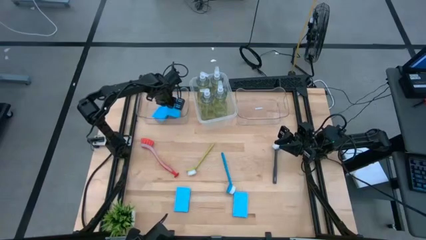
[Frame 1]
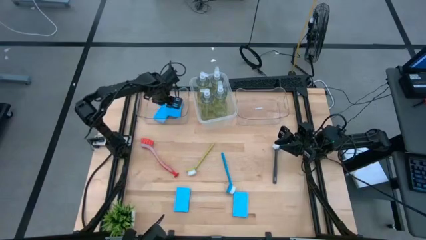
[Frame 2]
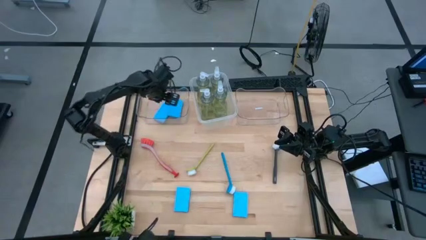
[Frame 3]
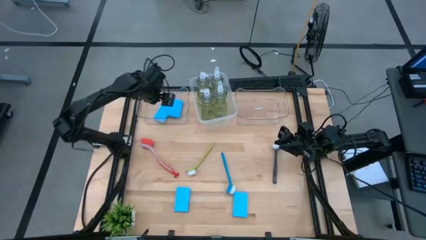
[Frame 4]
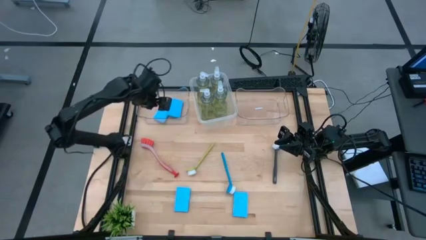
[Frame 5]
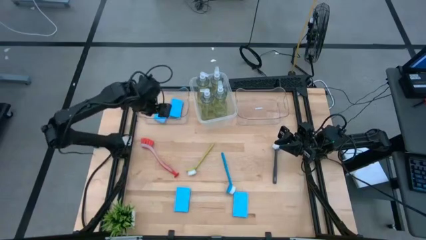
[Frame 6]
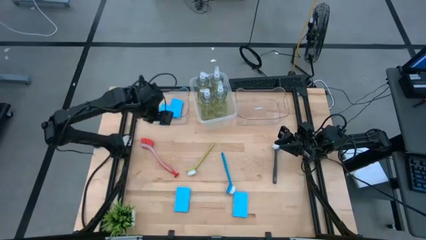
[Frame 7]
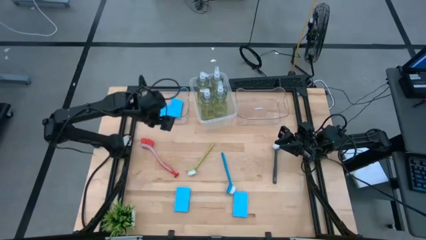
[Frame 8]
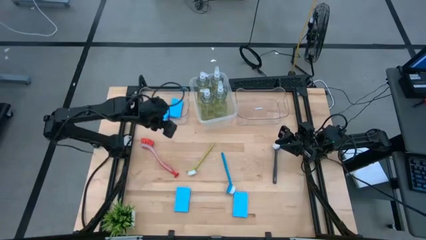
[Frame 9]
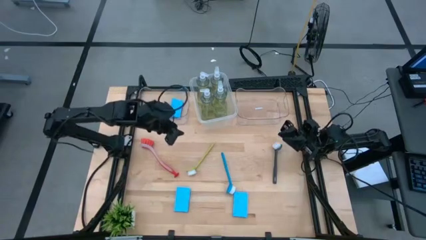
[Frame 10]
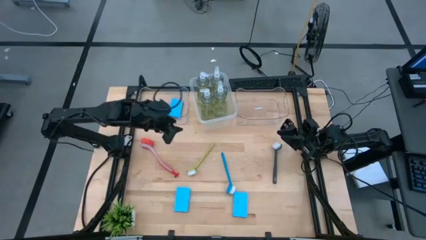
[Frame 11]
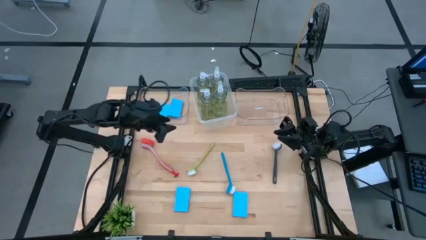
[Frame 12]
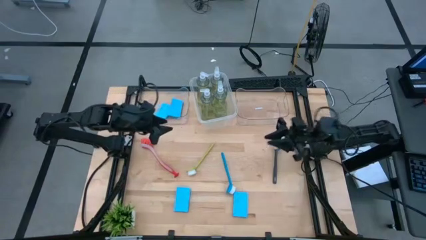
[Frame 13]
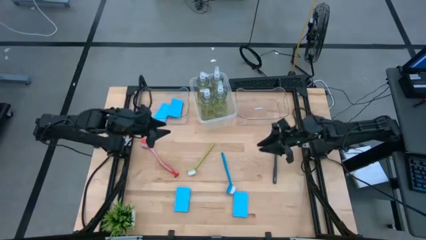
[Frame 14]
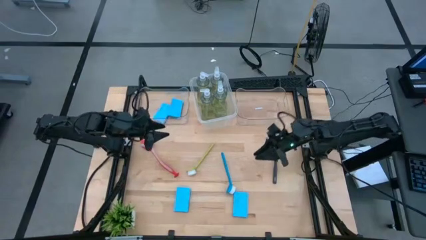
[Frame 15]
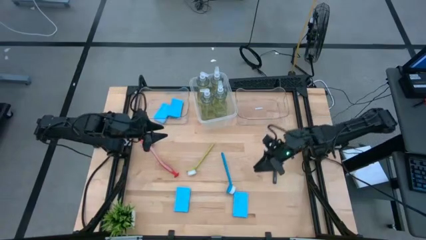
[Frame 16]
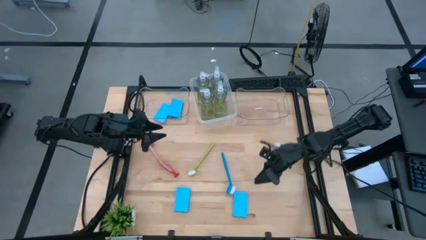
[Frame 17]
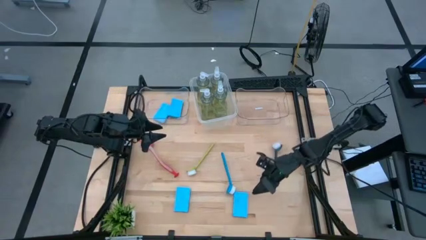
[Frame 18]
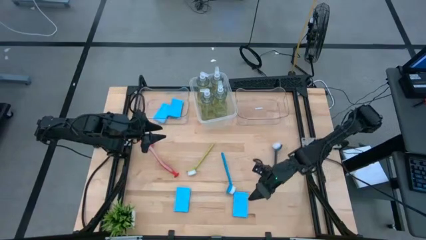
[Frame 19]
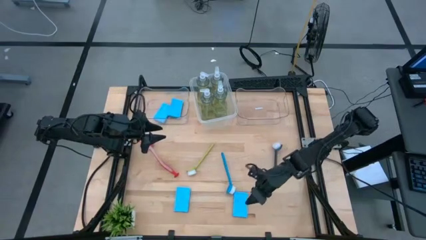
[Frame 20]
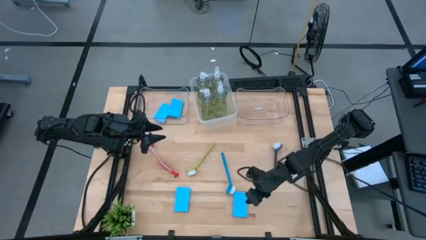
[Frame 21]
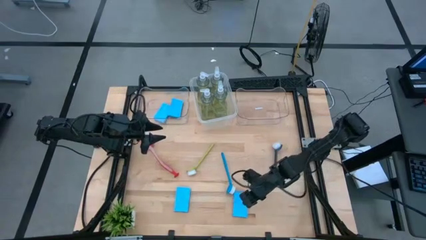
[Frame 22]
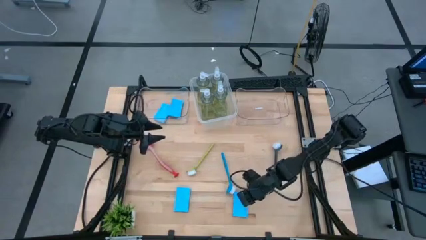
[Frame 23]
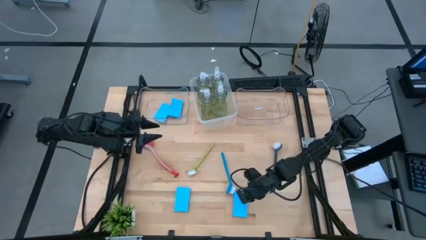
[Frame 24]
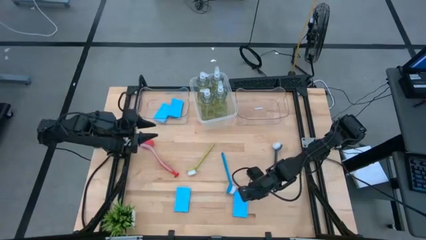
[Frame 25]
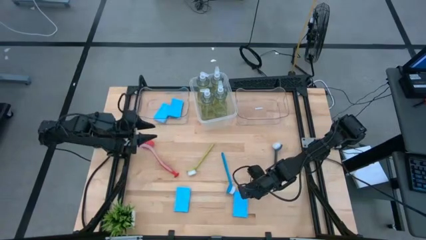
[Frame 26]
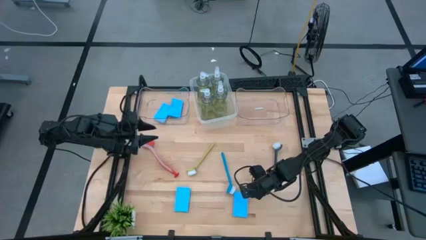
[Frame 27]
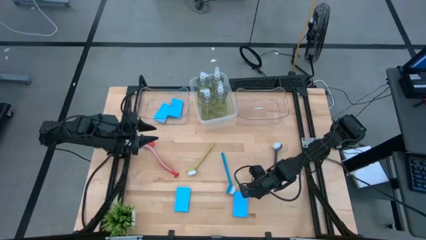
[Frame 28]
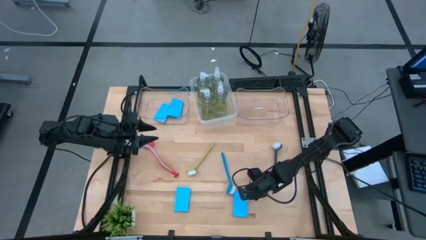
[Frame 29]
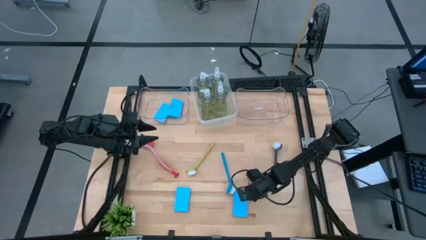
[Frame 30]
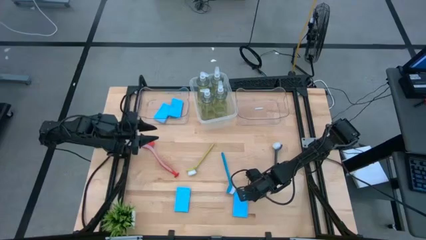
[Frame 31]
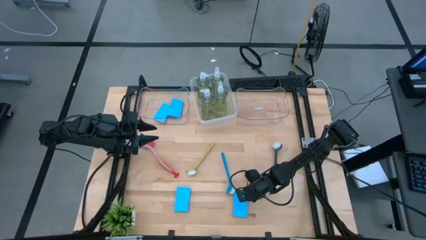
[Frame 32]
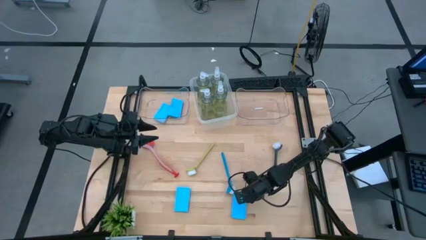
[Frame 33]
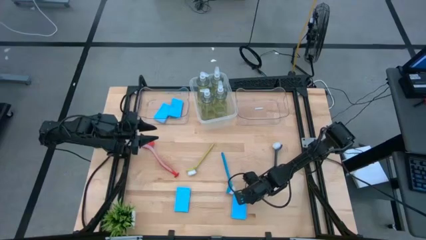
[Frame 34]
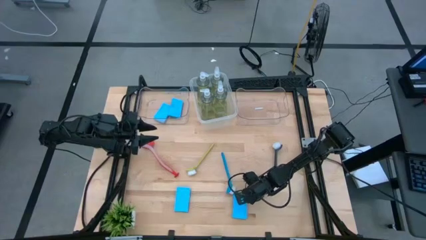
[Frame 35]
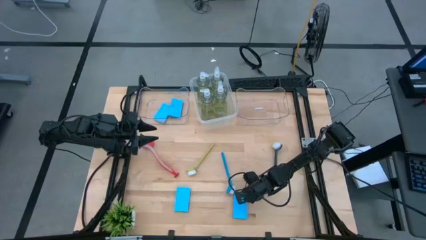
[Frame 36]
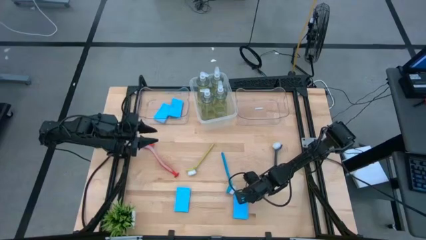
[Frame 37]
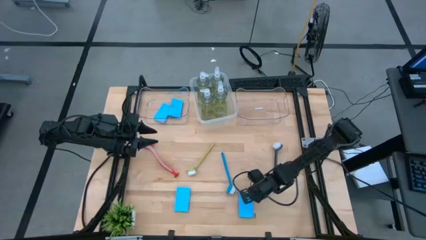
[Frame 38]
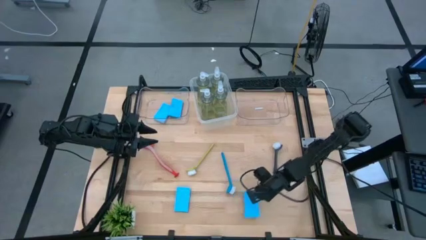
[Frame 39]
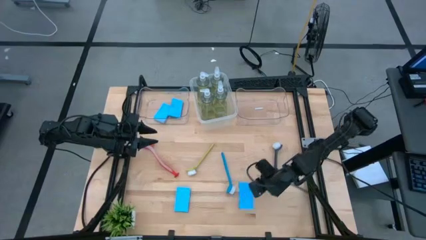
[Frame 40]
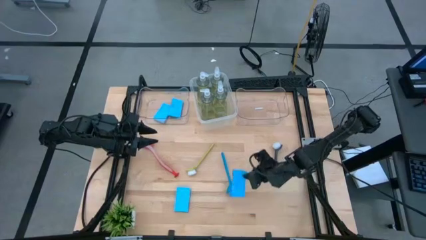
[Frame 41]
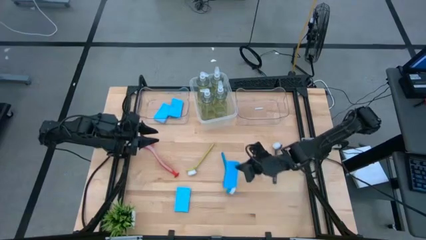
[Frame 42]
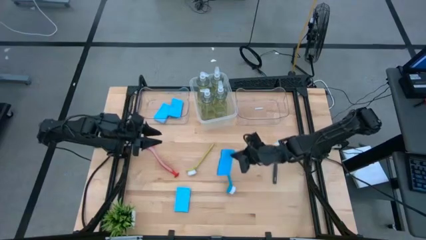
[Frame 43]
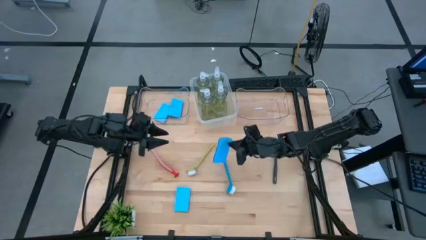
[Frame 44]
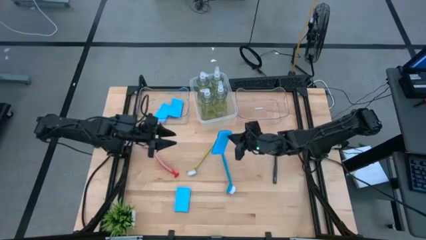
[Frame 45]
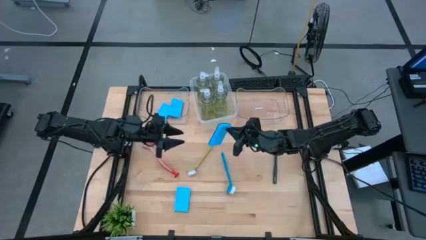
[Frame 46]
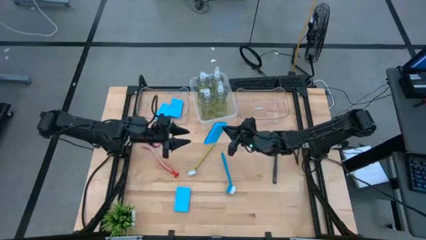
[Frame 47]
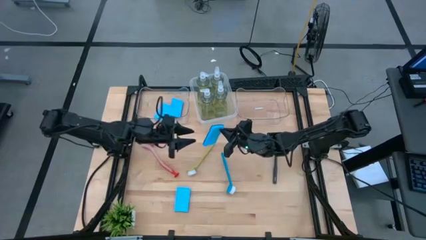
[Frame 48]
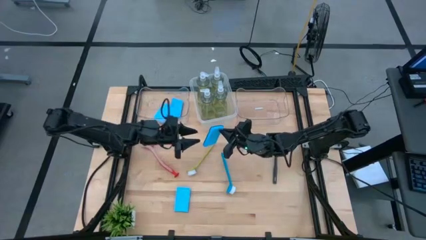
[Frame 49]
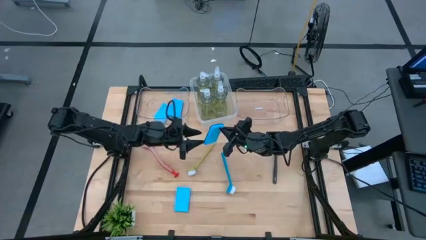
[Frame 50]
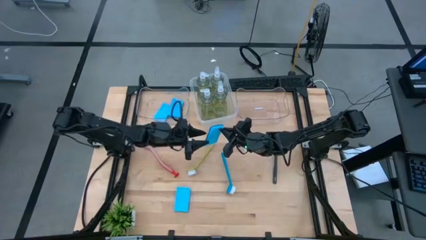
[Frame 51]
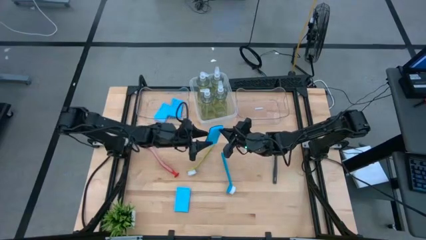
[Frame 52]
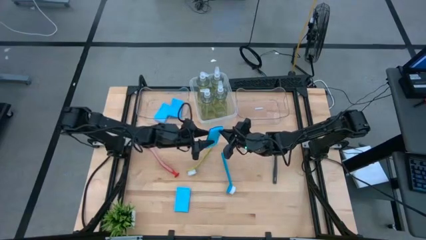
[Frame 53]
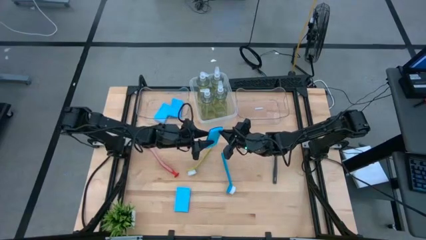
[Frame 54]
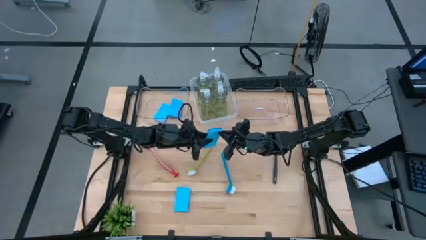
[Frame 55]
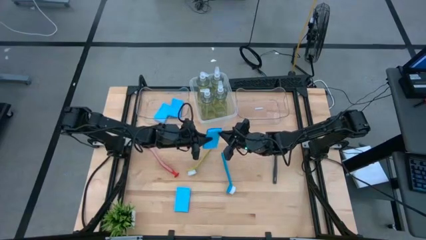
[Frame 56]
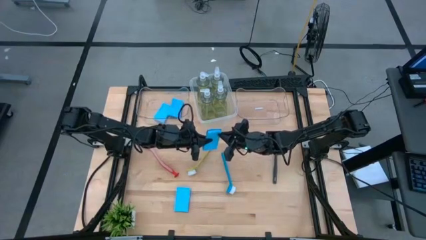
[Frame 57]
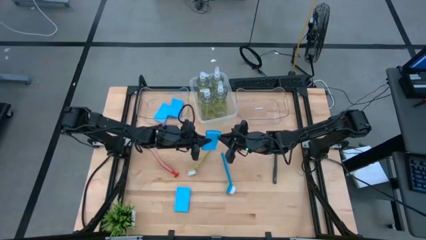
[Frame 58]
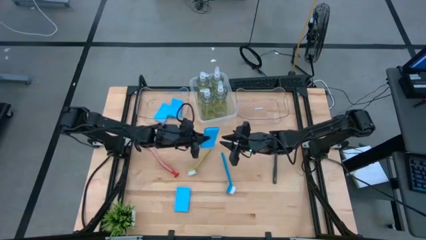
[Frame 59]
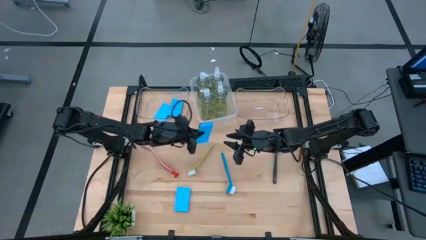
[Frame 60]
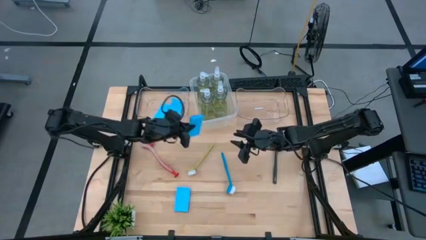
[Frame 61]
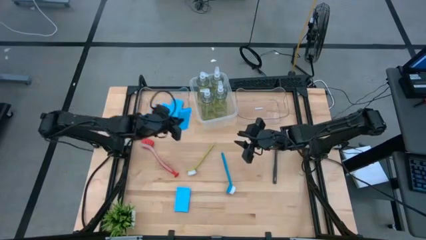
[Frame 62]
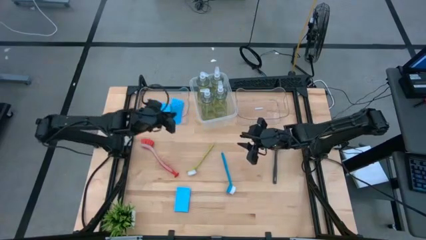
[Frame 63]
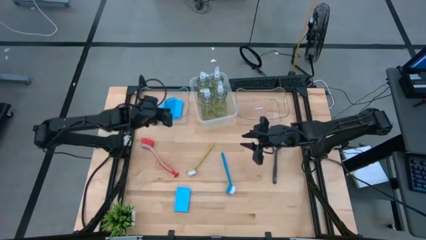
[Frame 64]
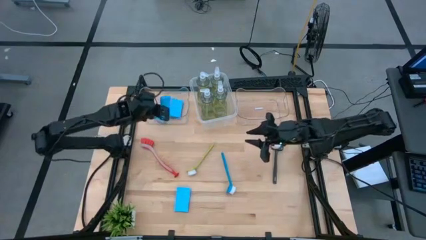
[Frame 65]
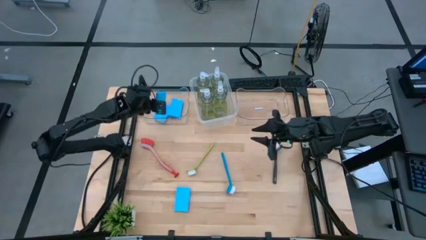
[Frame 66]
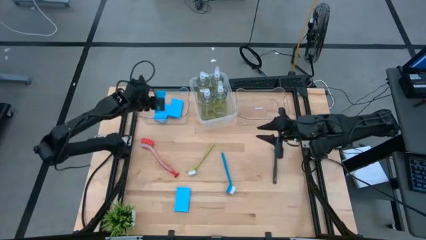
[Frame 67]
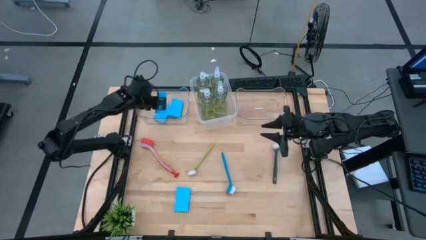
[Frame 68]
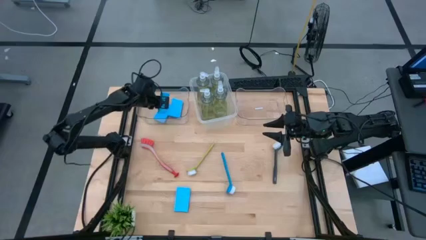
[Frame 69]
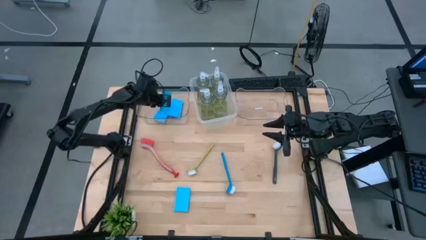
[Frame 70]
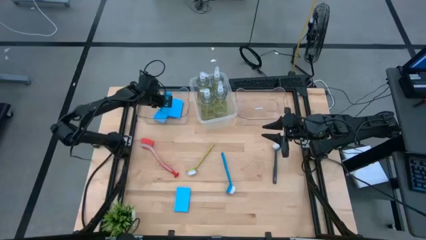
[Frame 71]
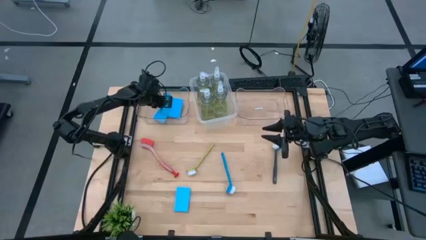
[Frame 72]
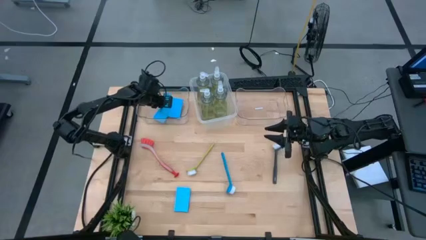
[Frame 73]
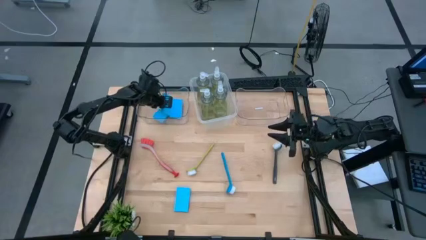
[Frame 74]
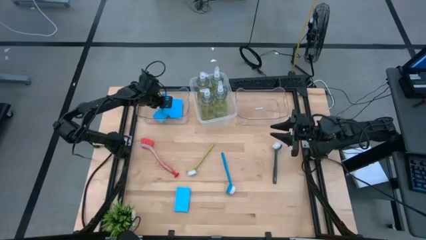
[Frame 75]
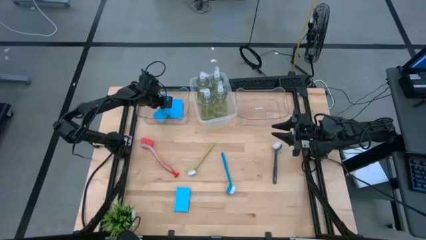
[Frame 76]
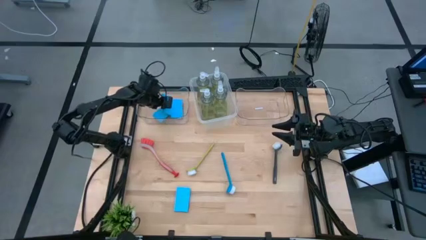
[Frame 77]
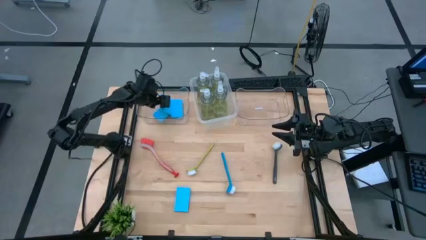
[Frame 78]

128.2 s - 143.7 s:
Task: Pick & Place Kitchen Sink Supplies
Put the blue sponge into the left transparent bin

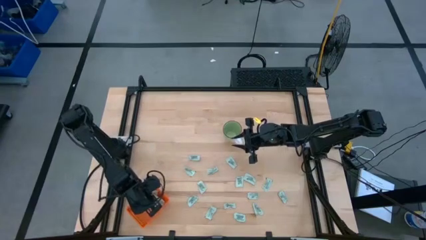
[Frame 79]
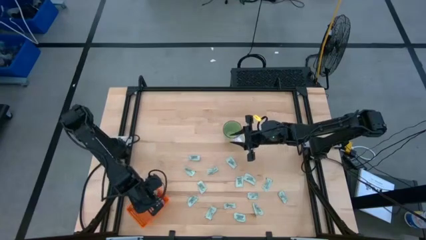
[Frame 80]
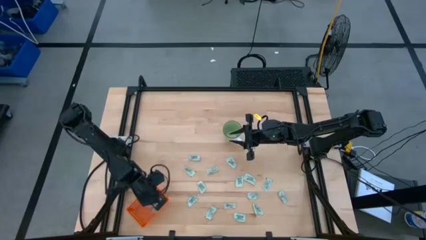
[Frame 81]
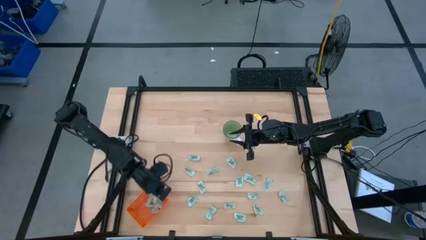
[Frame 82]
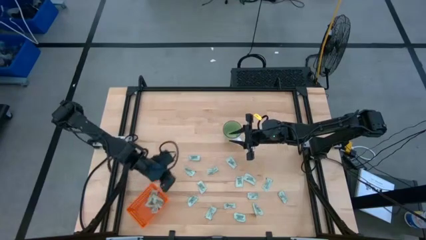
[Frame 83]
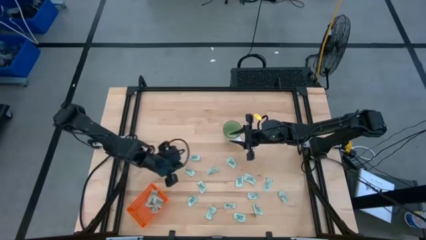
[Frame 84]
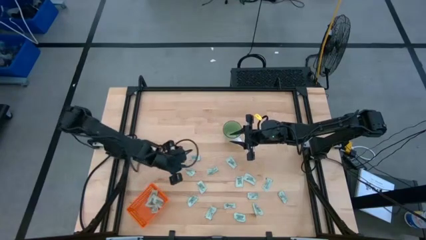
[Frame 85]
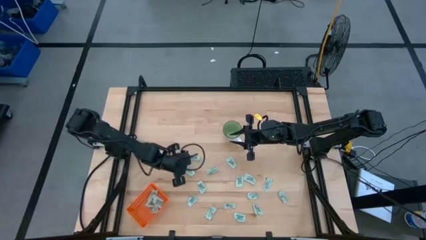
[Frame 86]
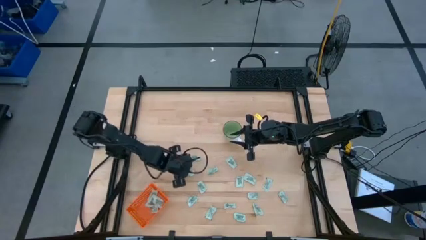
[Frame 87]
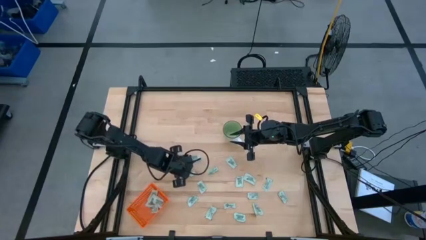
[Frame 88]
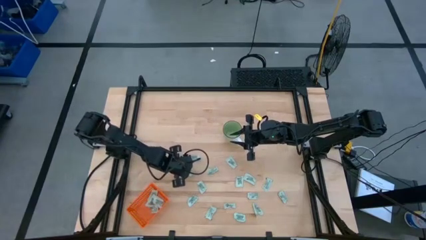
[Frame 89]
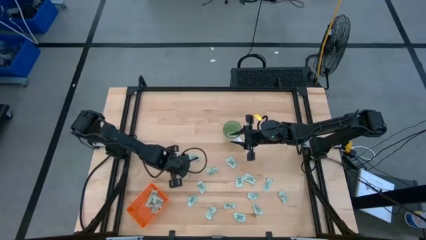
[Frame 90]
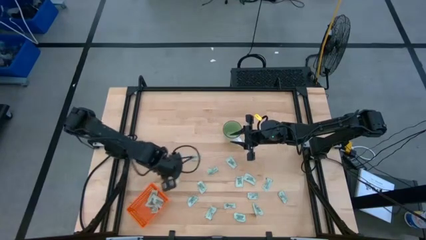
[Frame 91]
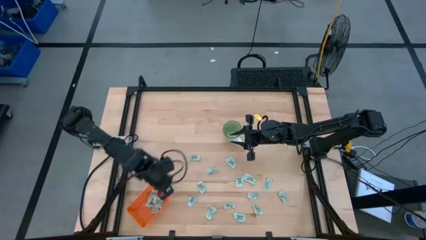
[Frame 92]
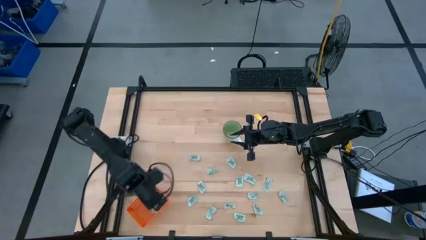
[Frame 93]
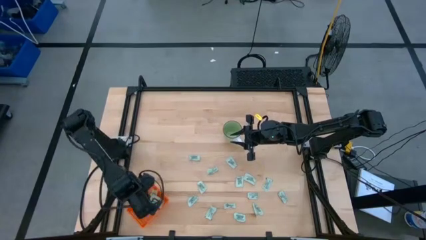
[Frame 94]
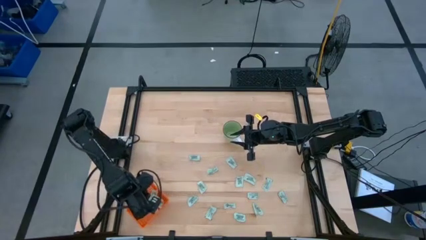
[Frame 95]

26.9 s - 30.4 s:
Task: Pick and place Stevia / Truvia into bins
Put the light green stevia packet into the orange basket
